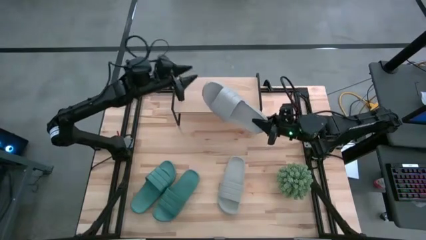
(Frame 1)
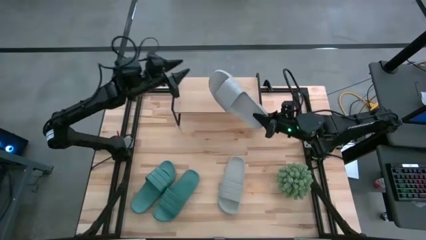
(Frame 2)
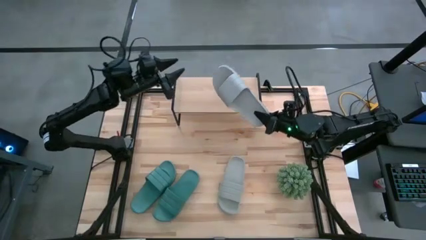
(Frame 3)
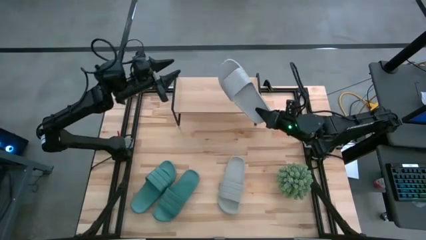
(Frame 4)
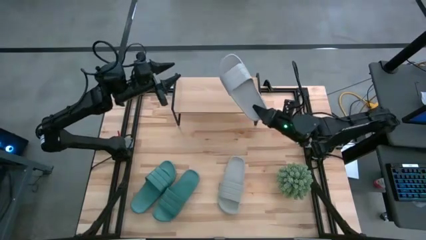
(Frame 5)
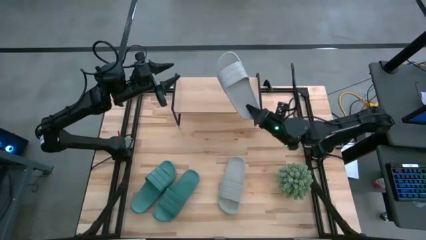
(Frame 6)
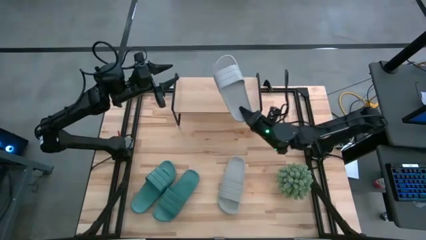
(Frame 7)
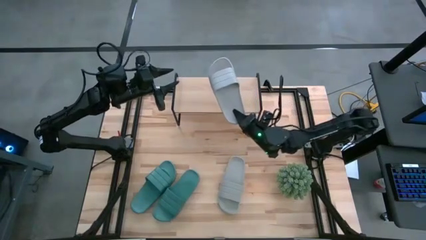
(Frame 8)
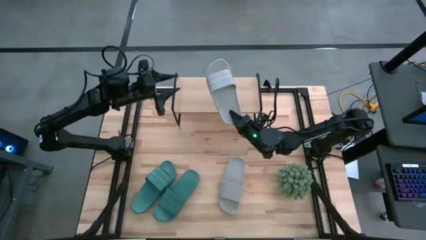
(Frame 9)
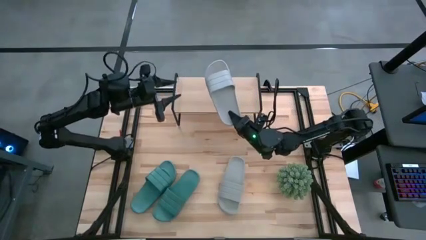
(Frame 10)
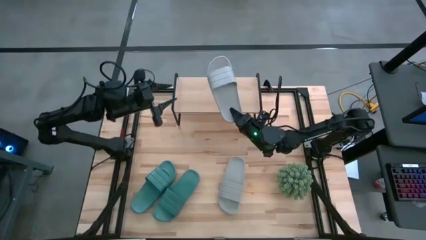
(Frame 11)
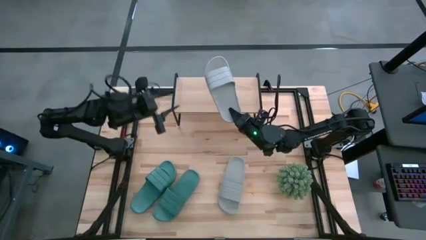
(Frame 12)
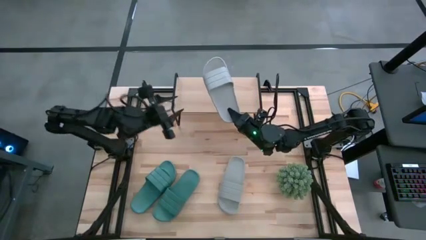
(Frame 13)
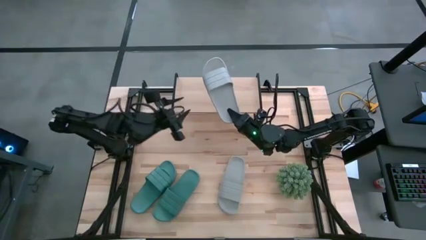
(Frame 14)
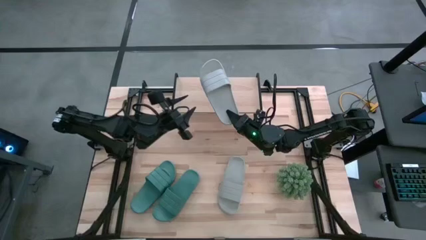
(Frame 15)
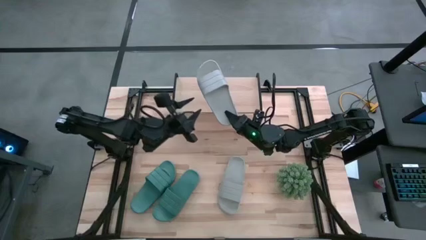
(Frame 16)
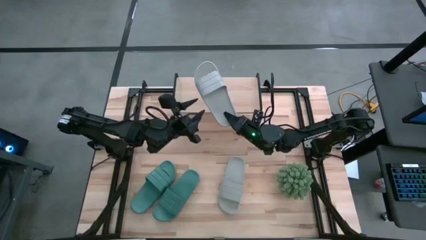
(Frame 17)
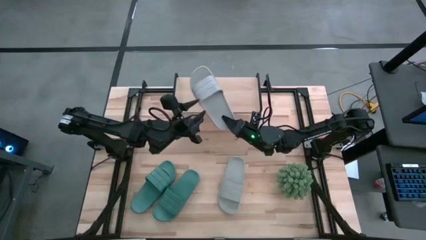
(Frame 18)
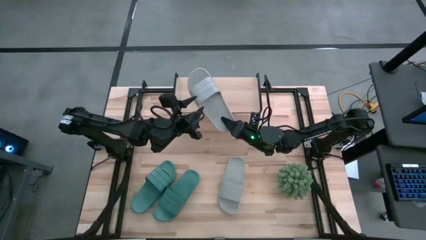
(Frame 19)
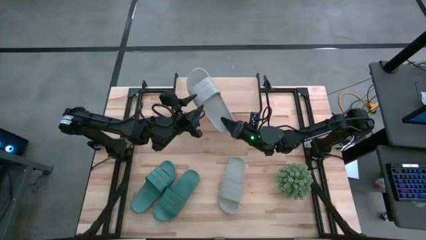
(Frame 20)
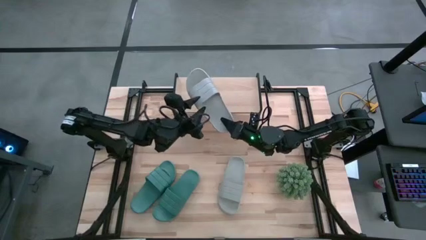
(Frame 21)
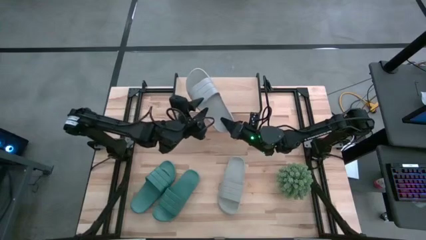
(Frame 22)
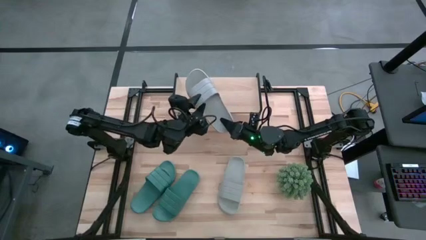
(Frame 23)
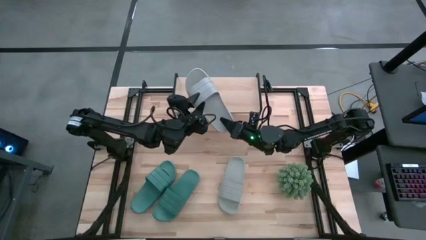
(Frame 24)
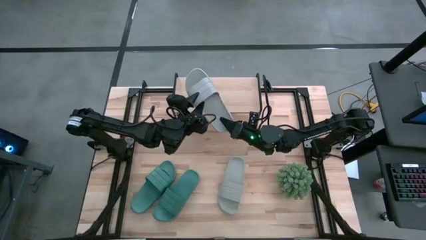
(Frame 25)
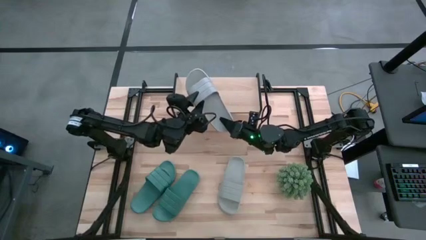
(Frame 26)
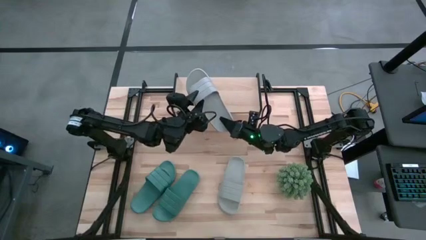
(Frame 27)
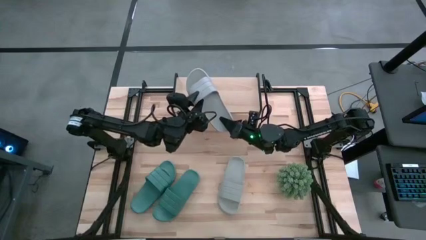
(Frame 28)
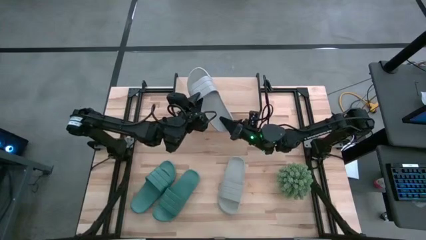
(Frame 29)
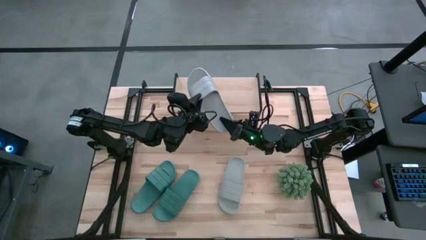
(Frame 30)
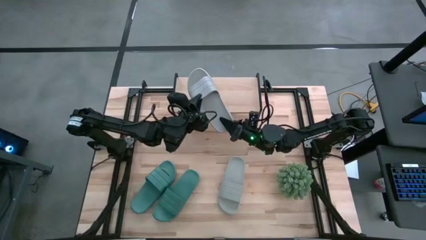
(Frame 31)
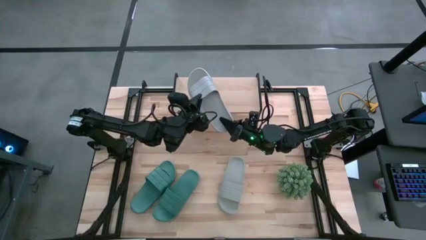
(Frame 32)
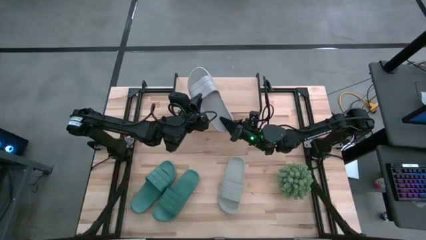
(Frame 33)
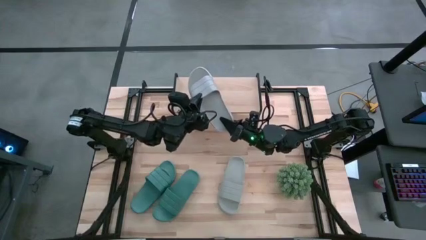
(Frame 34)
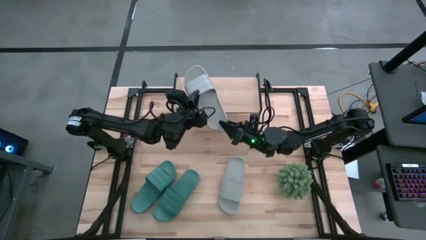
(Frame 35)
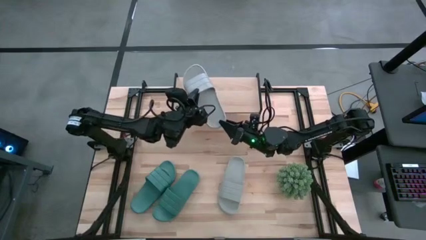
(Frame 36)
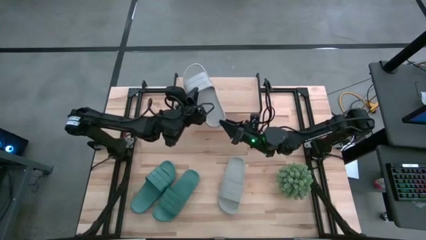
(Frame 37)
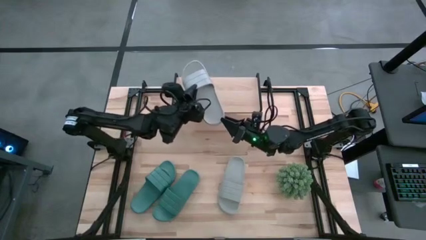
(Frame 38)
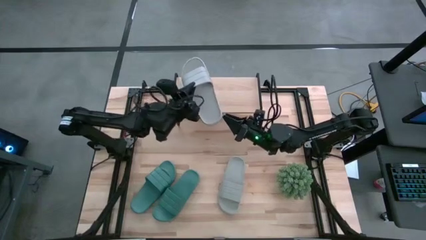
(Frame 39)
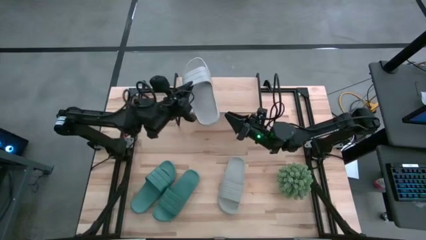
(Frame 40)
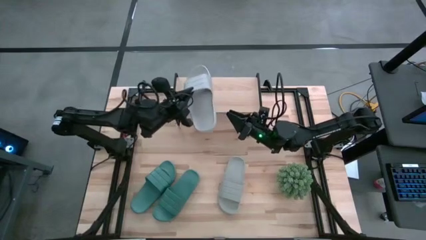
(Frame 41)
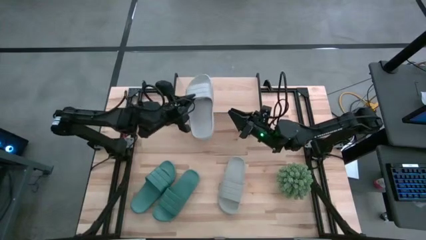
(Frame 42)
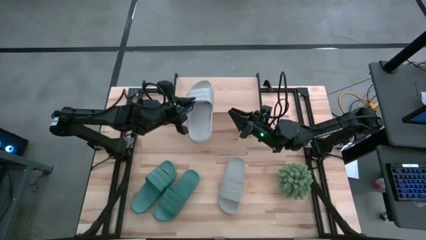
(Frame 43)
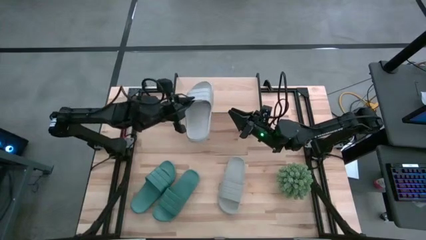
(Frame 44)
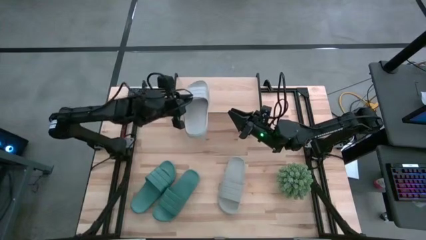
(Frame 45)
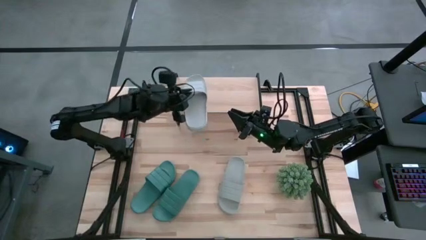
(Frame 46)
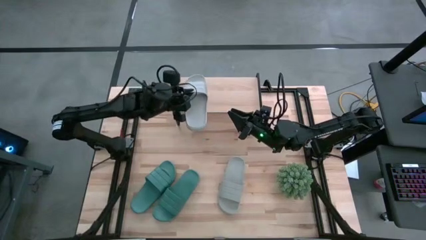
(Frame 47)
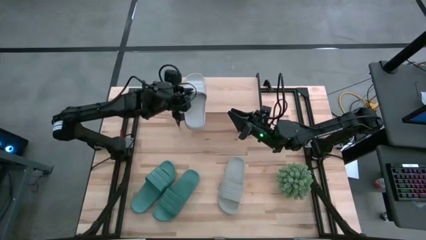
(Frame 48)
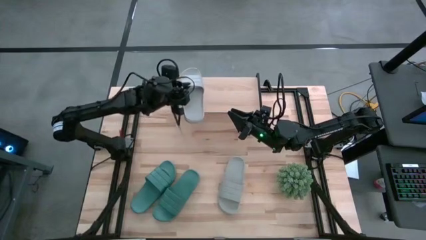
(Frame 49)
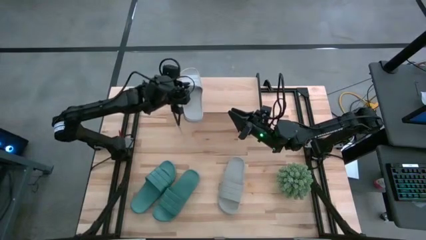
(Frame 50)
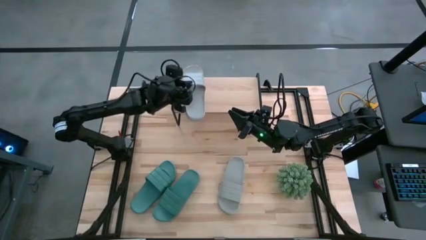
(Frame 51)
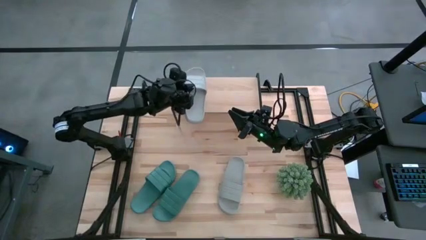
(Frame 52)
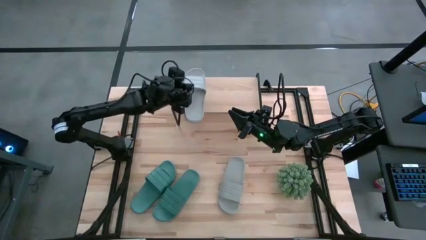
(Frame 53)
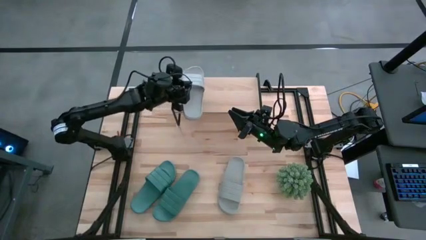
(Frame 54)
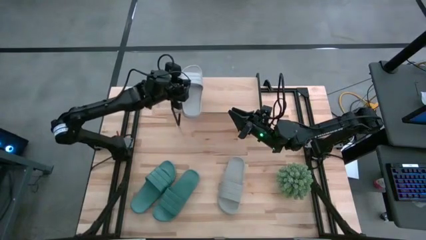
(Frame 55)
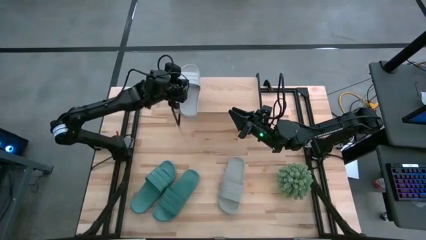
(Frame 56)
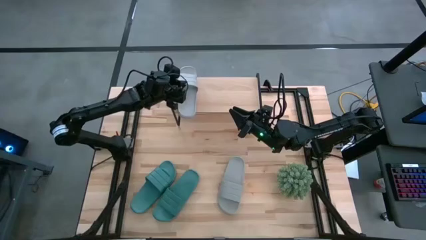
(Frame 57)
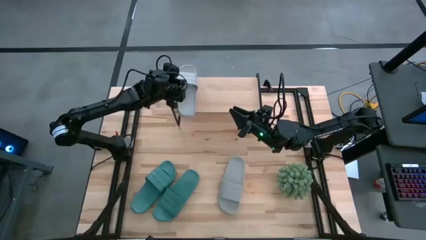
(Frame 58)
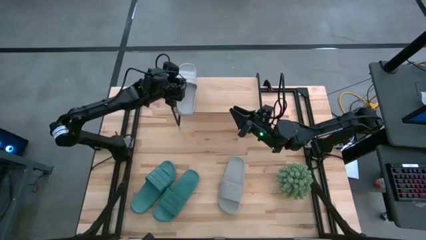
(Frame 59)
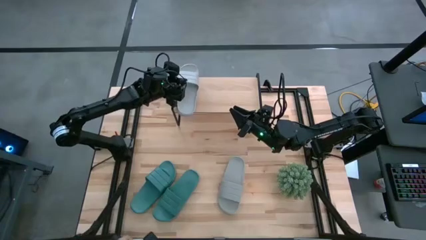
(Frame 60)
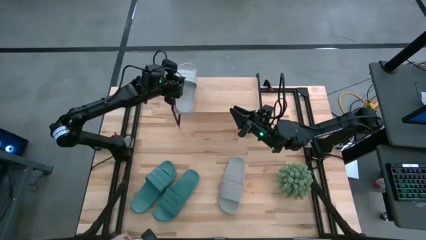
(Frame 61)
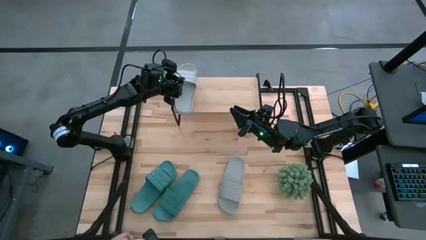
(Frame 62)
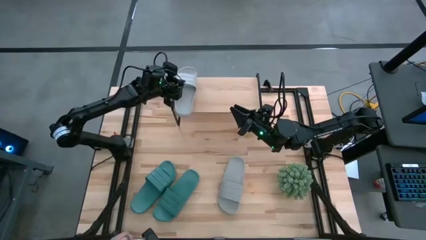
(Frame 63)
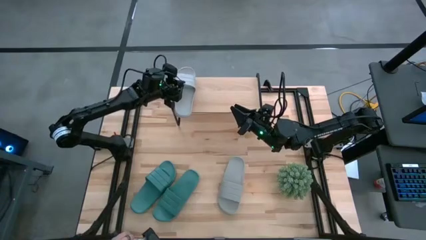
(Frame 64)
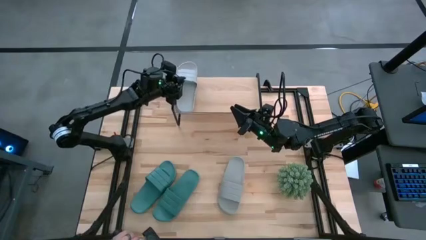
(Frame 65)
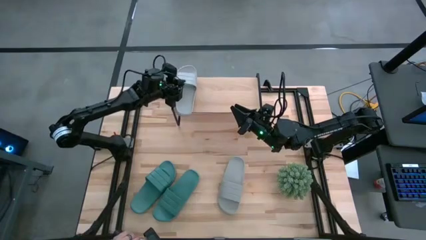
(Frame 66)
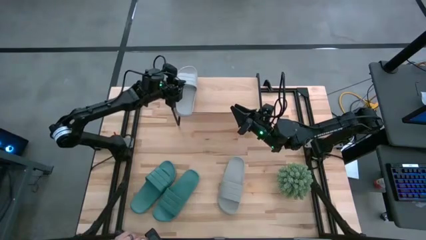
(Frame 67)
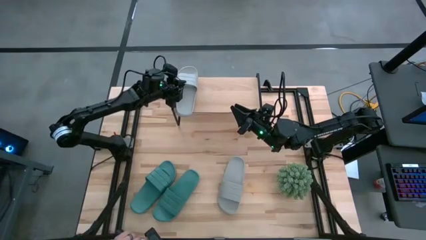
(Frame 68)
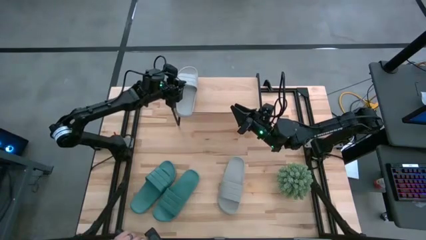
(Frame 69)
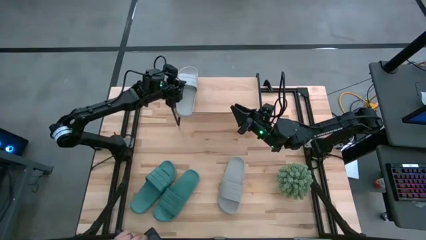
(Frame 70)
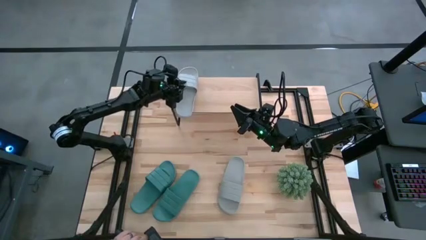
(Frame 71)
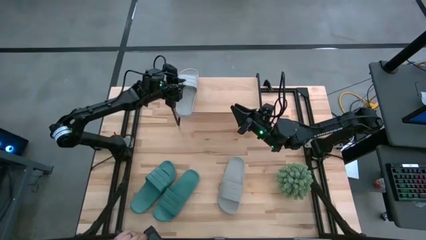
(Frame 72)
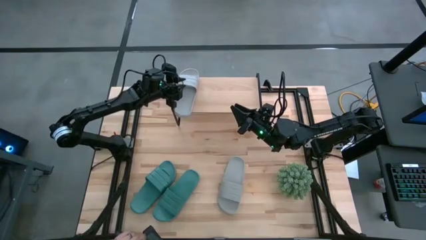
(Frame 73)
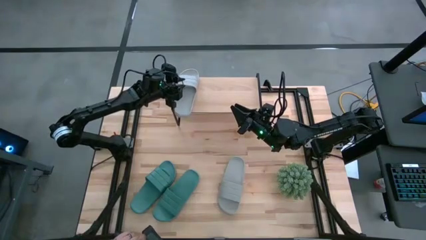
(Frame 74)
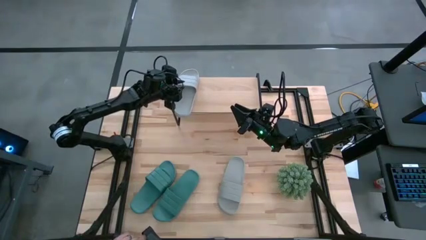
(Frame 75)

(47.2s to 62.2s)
Task: Pick and place slides into the shelf
Put the right gray slide on the shelf
